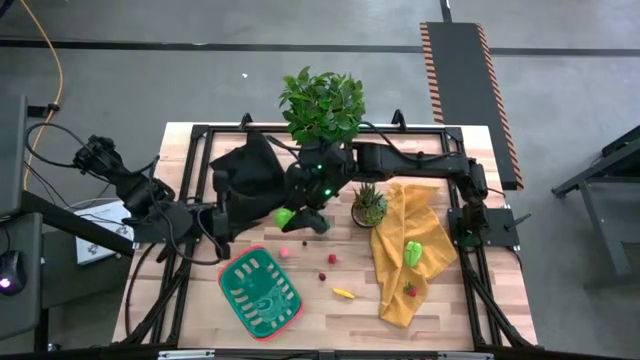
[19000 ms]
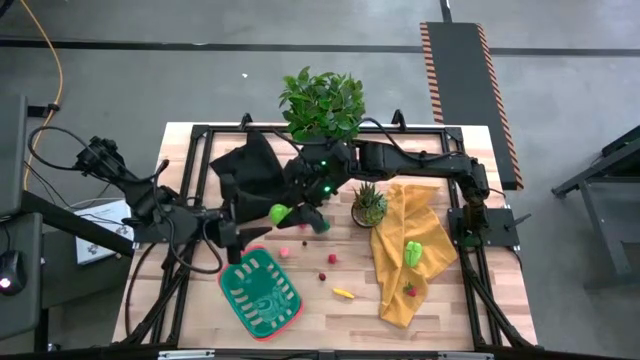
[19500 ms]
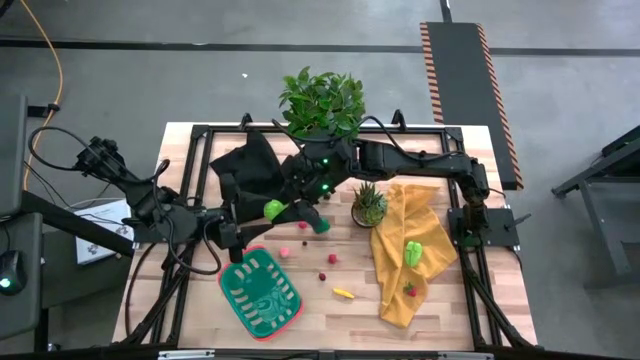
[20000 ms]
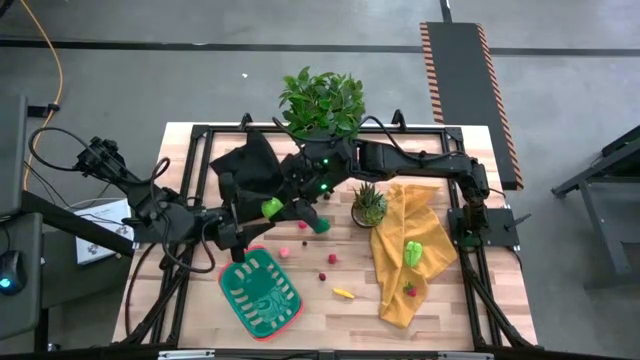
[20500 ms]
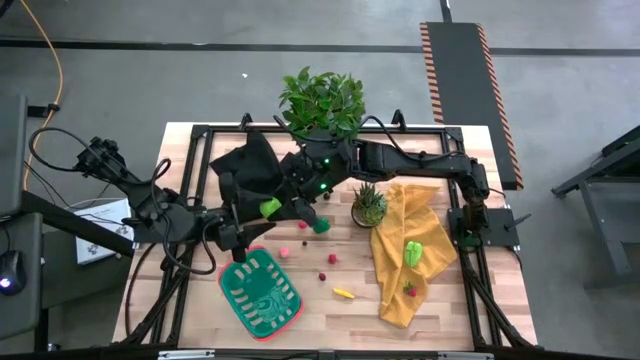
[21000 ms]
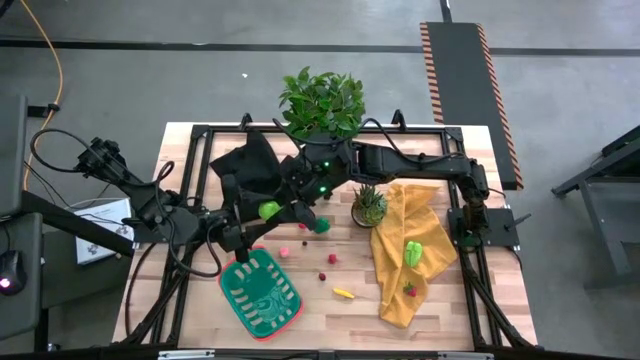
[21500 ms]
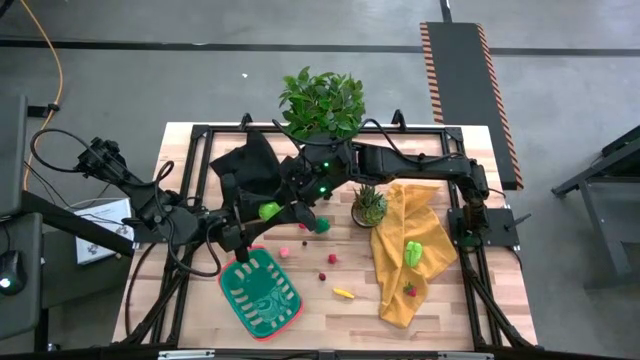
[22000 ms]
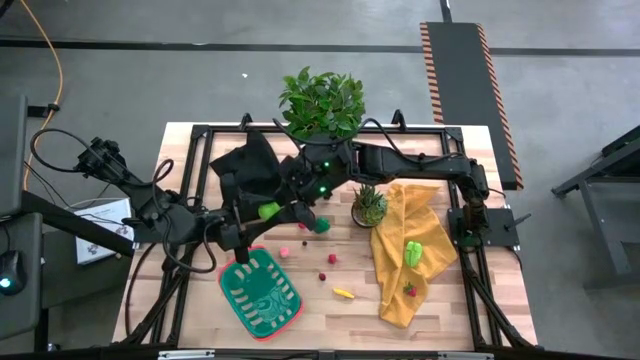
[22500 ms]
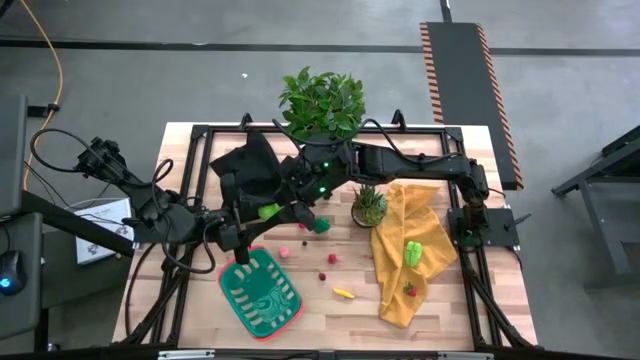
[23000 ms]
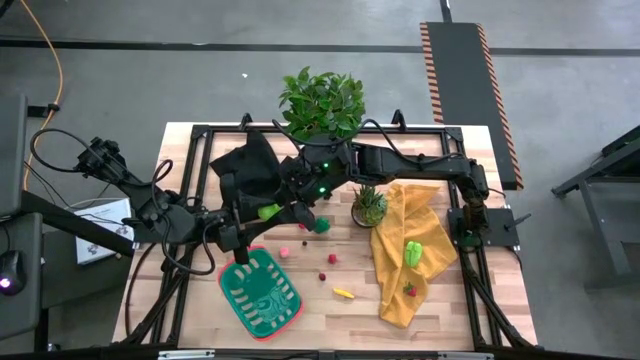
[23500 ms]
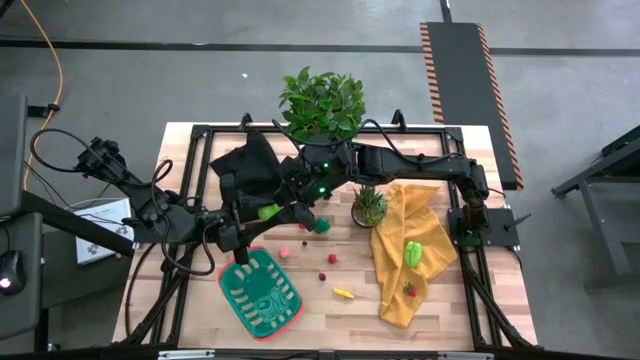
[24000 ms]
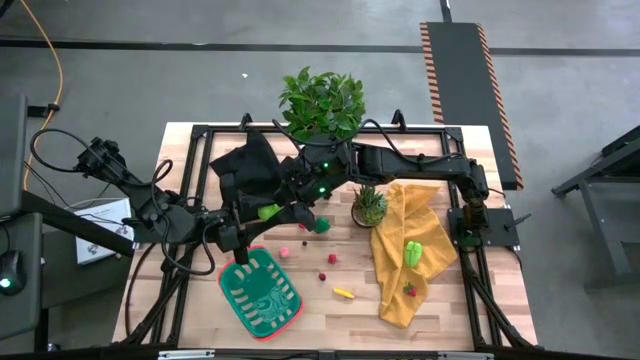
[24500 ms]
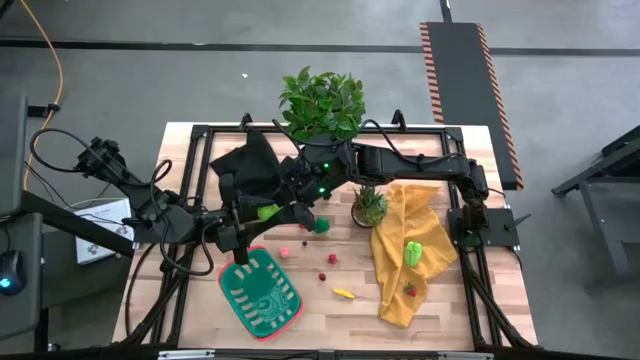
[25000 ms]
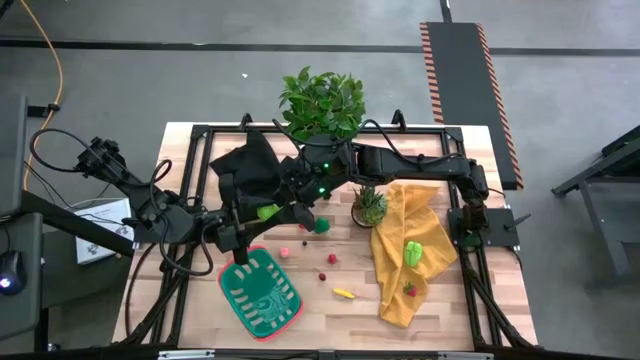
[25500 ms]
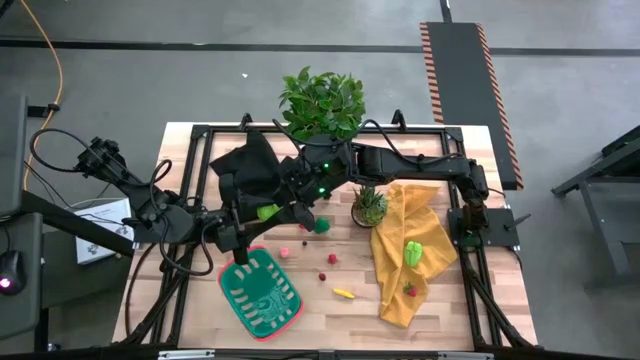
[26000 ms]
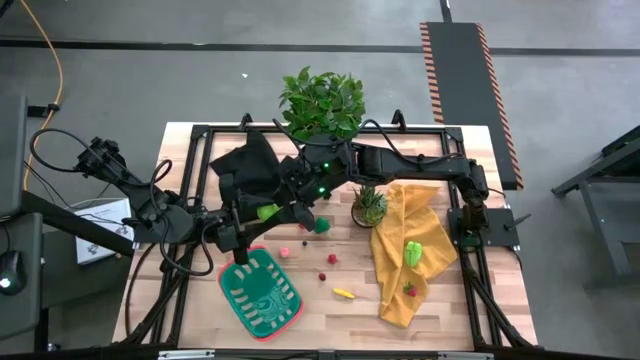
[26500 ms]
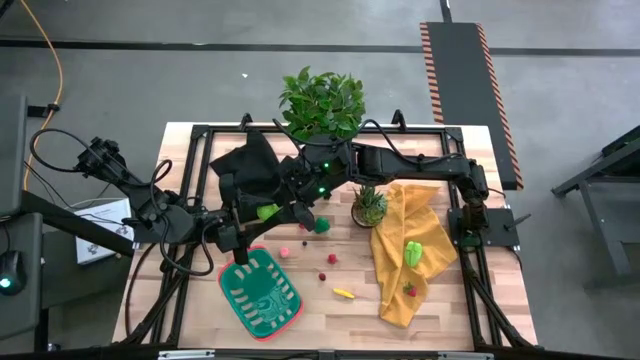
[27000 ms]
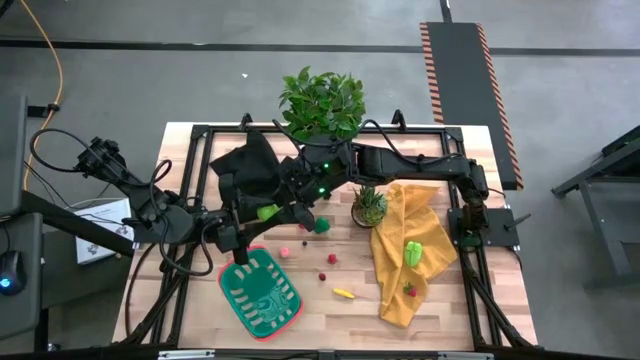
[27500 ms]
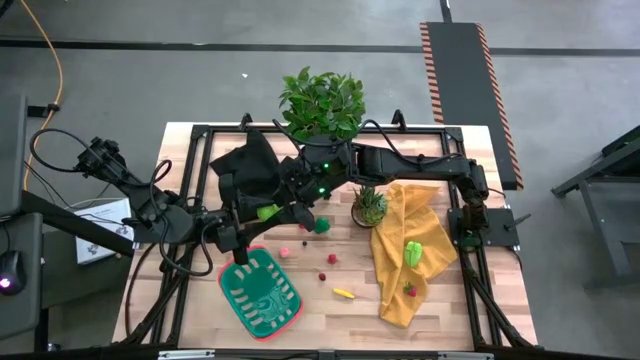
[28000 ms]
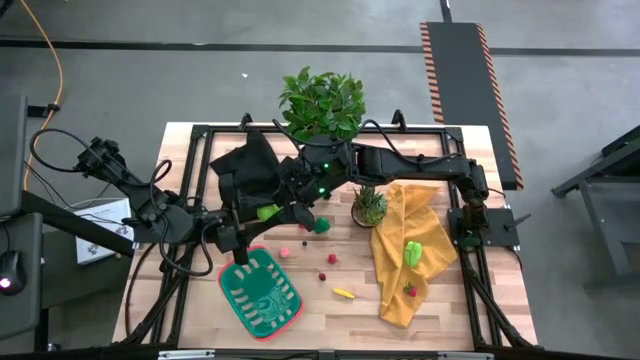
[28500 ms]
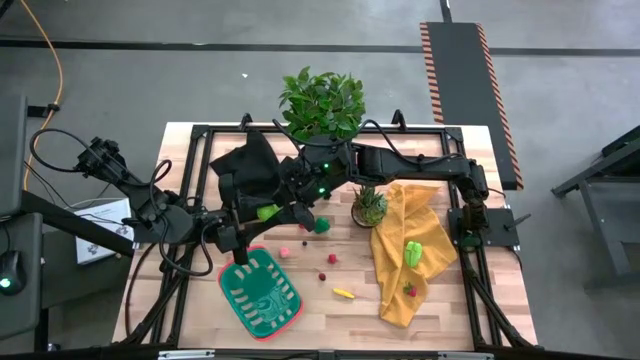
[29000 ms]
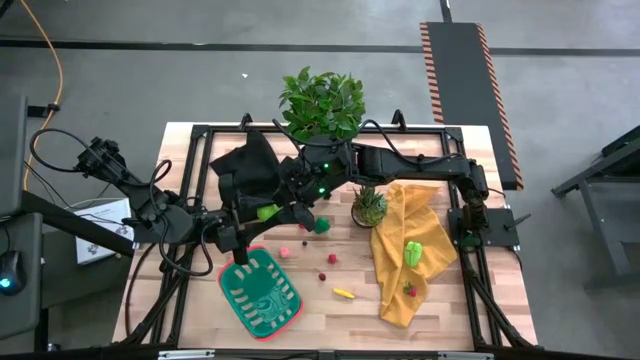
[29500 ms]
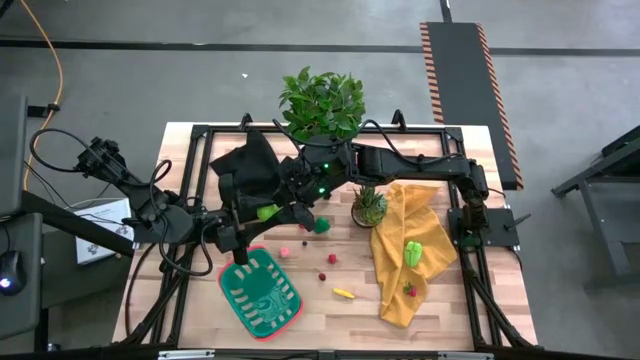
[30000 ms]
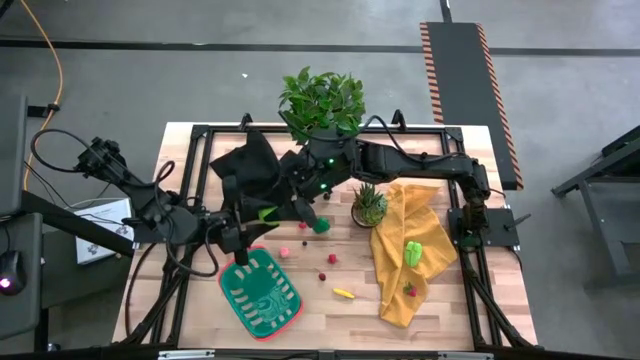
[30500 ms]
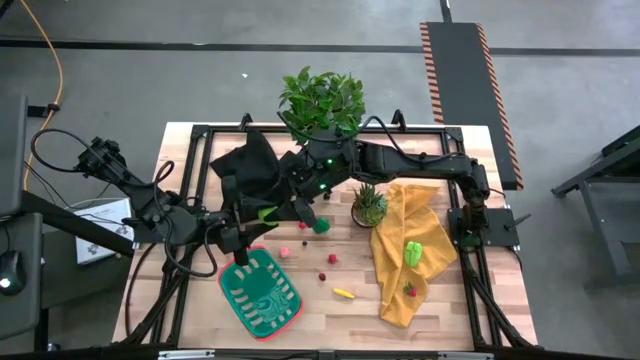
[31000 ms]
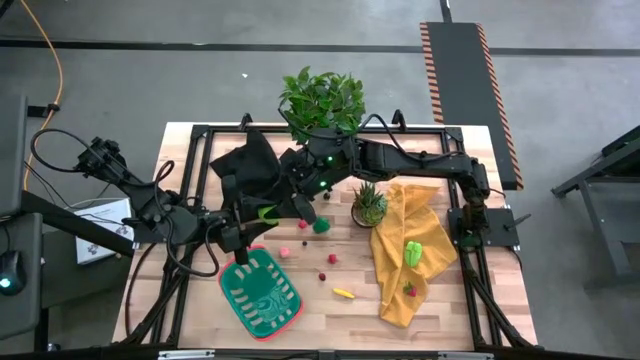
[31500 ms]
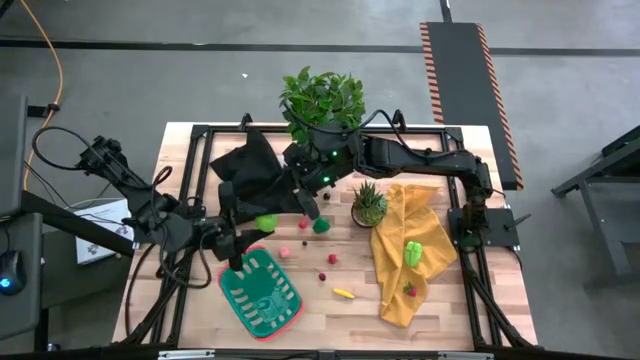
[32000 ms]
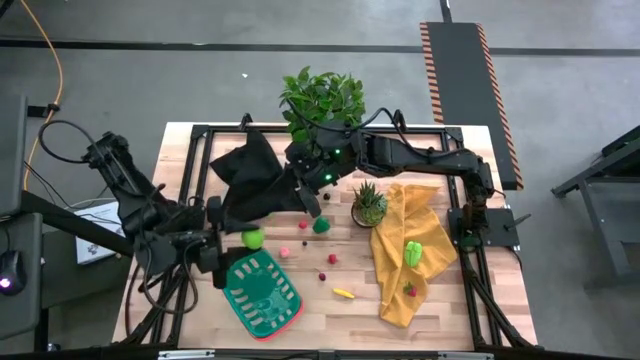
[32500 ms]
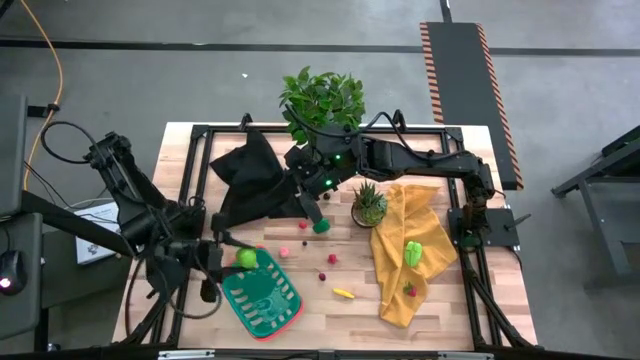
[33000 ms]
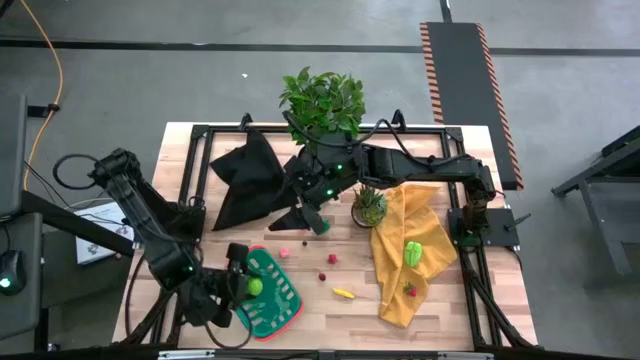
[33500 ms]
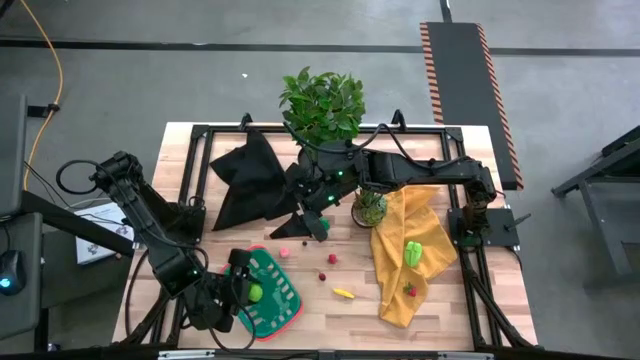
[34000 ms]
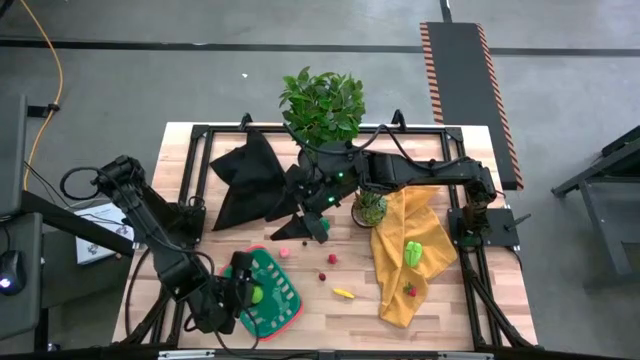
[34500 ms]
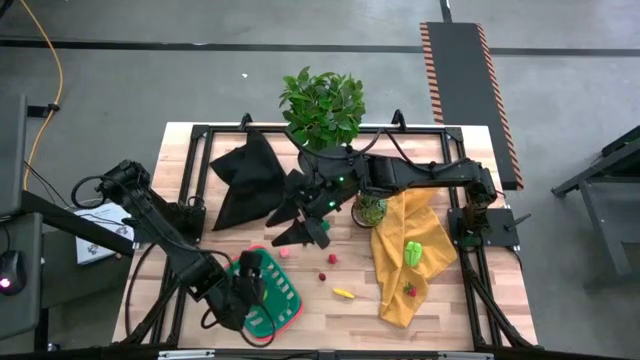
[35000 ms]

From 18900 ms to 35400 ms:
Task: Pick and placing Produce into tupperware
Put the green cabbage into the blue basket

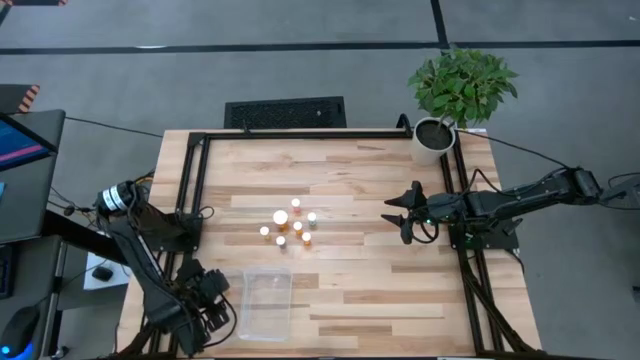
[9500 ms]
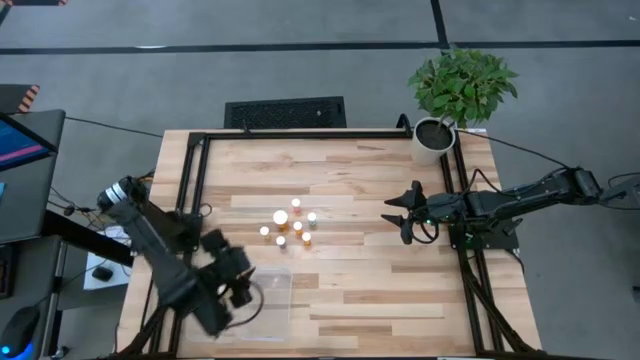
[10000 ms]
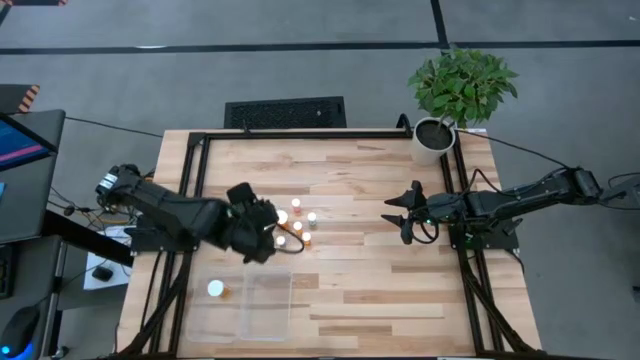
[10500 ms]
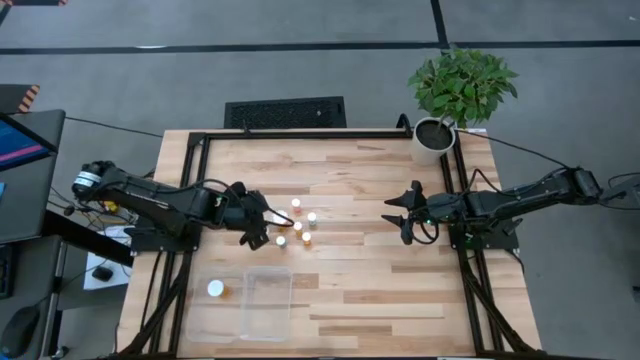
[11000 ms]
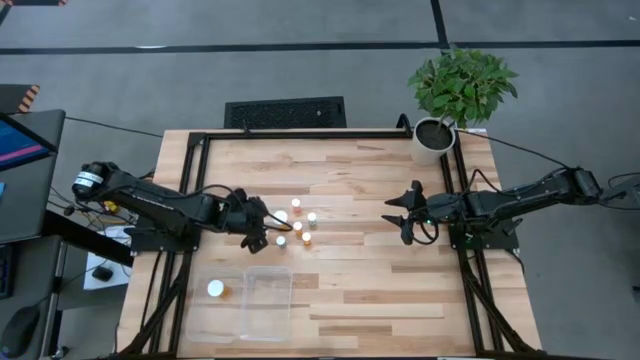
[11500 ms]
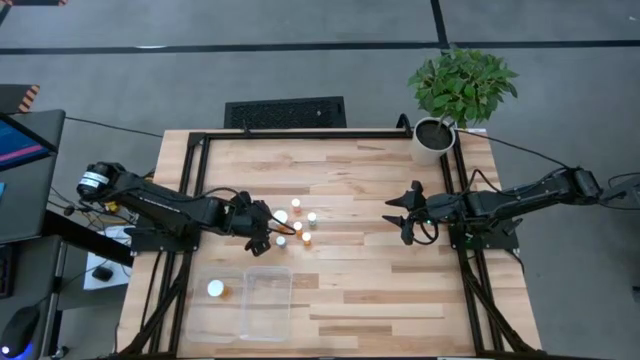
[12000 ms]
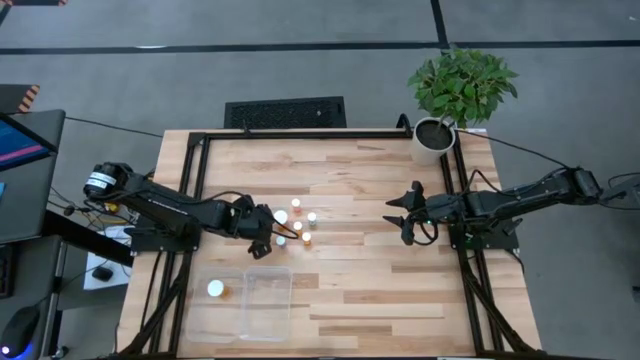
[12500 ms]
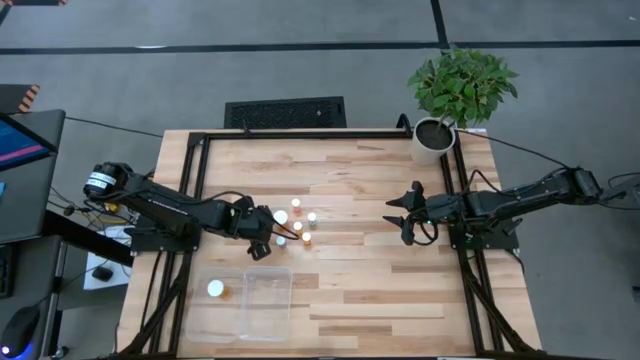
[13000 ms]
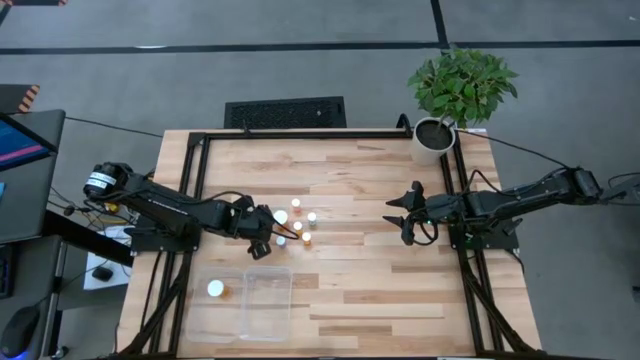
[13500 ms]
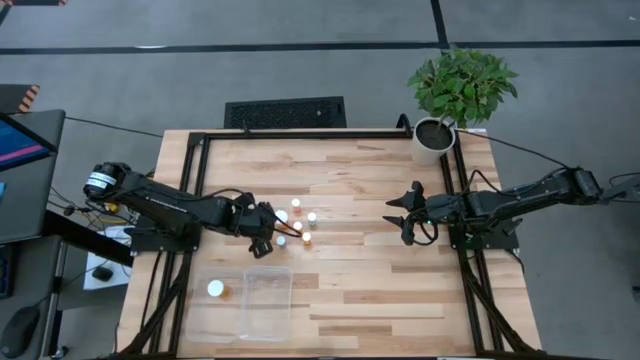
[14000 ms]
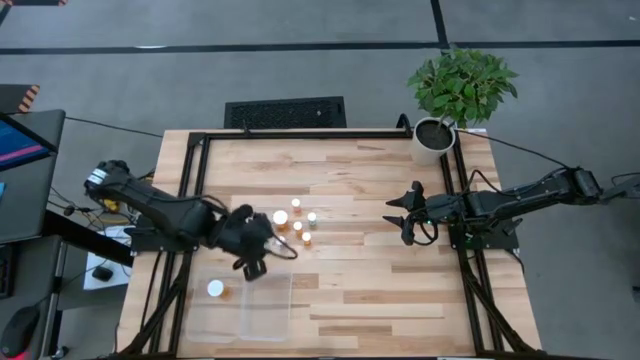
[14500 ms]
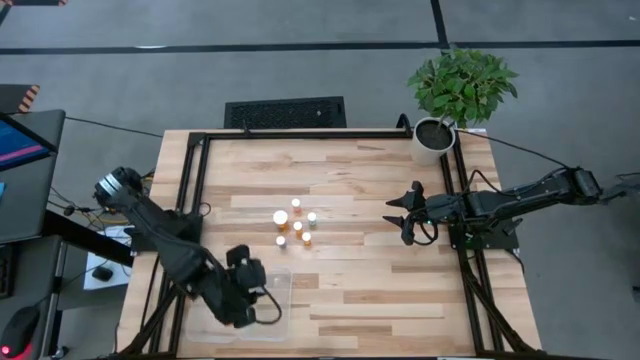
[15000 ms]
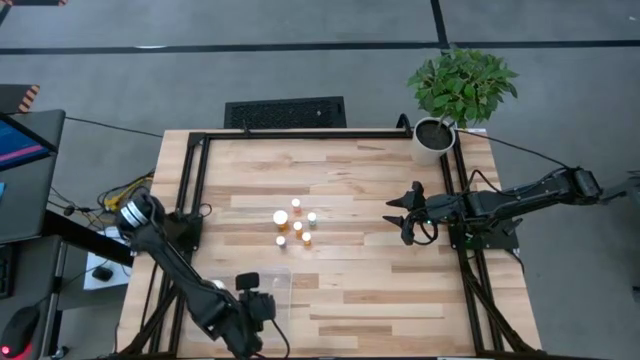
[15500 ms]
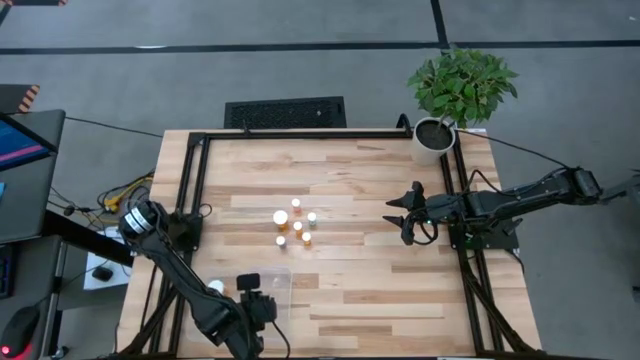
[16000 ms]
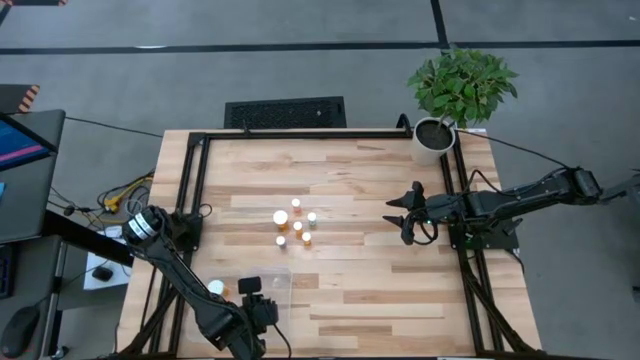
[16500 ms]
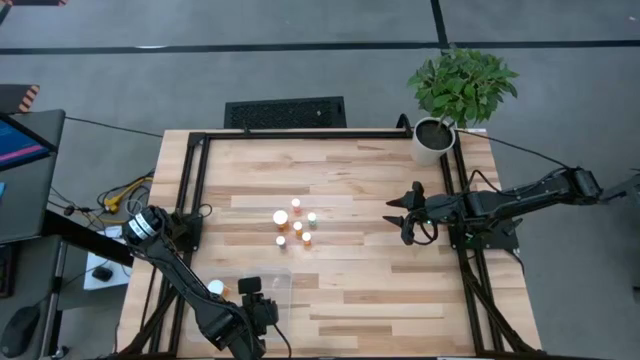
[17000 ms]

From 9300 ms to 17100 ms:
Task: Pick and place medicine bottles into bin by pill shape (circle, oval)
Put the yellow pill bottle into the right transparent bin
